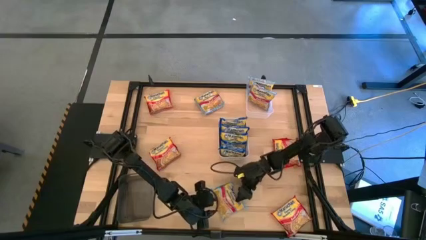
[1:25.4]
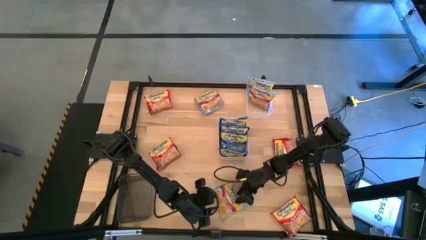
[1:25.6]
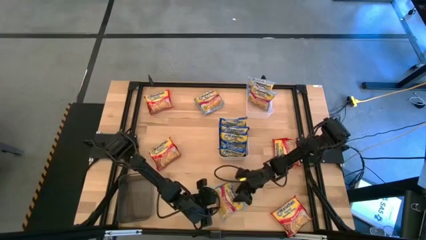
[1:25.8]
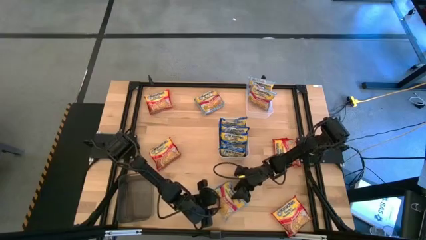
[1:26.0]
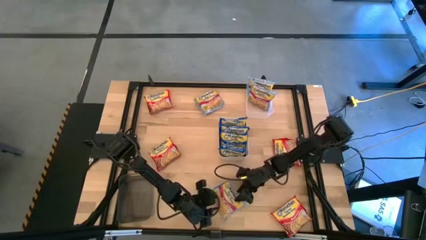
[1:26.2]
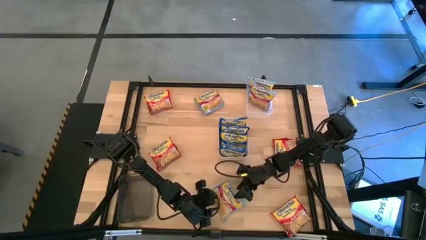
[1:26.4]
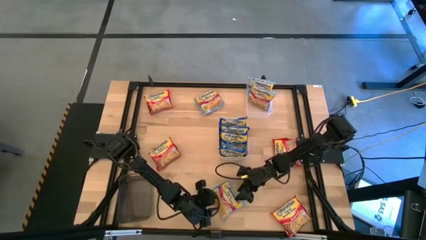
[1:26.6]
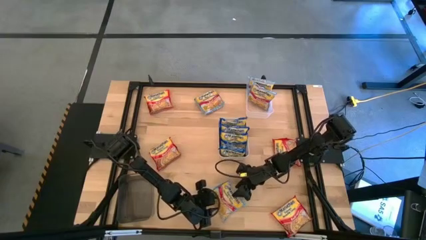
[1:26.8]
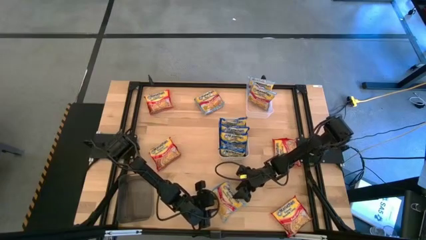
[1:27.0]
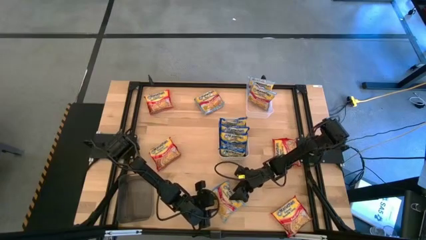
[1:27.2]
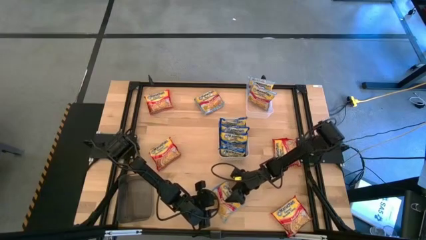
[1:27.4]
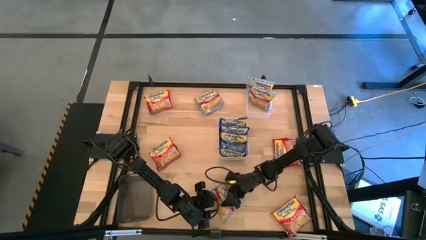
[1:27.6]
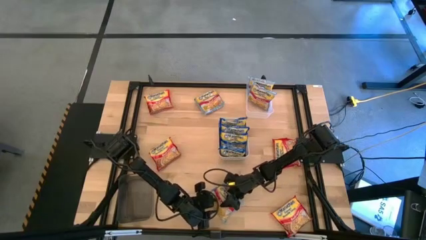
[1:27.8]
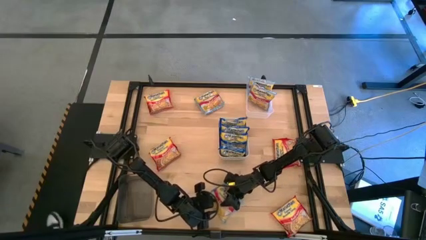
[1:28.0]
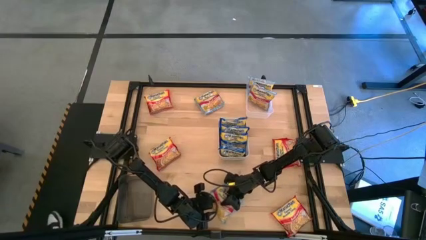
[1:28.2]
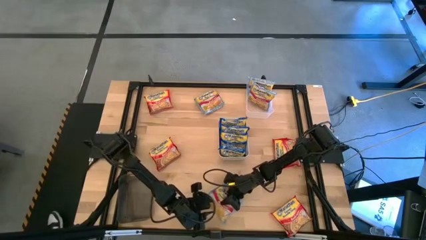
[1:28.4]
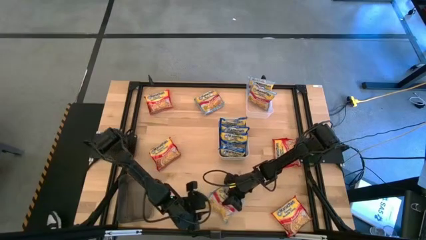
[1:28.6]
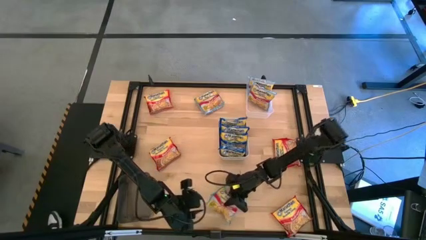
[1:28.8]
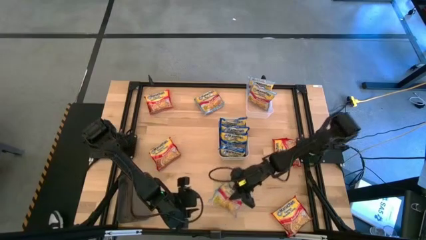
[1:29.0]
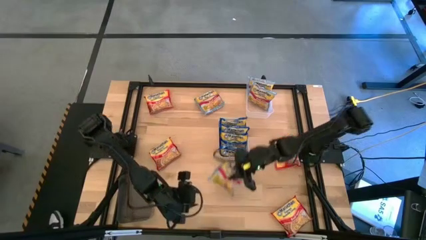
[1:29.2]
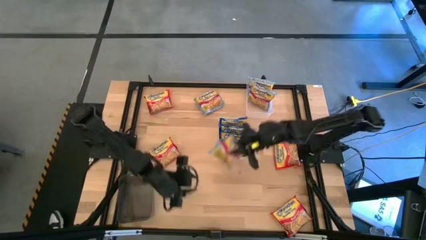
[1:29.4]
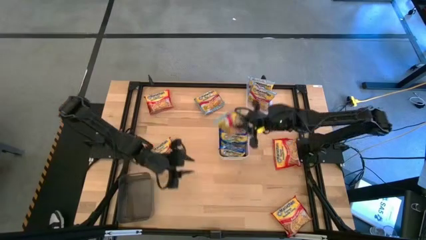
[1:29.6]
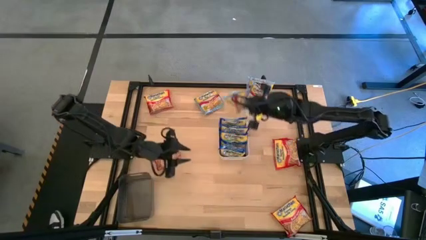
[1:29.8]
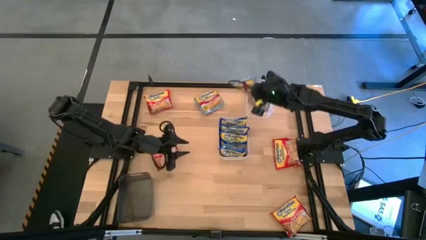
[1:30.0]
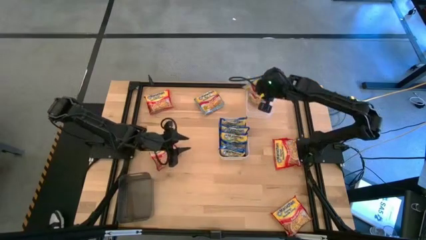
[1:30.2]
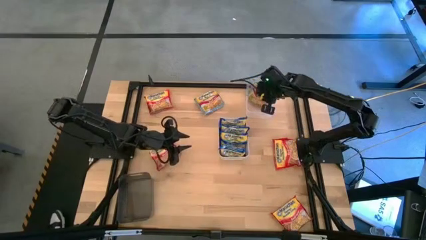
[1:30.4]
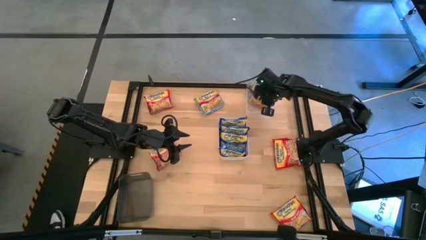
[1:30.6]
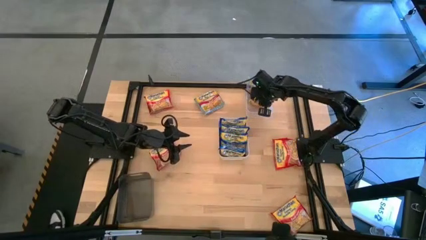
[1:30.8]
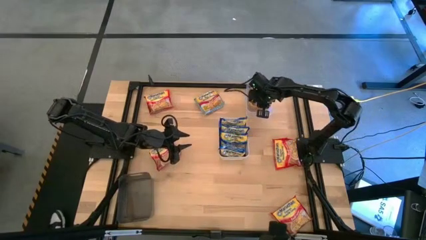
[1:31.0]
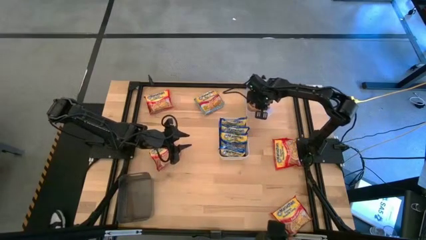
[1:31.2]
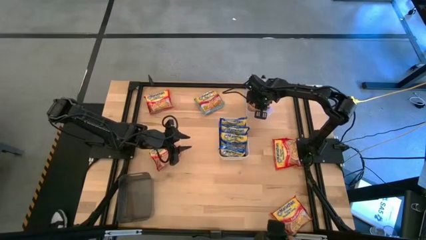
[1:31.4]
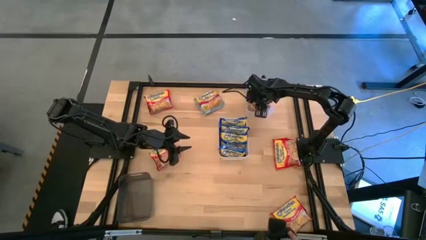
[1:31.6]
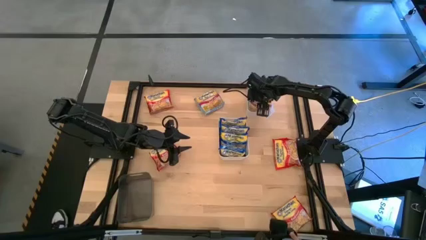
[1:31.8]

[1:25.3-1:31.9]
Task: Sort Maruchan noodles
Put the light blue noodle pack in the transparent bin

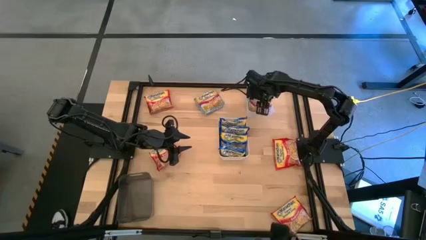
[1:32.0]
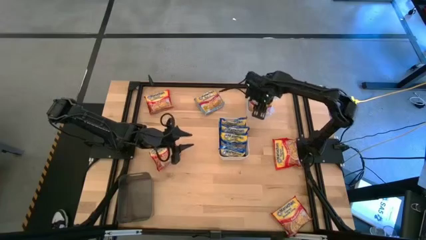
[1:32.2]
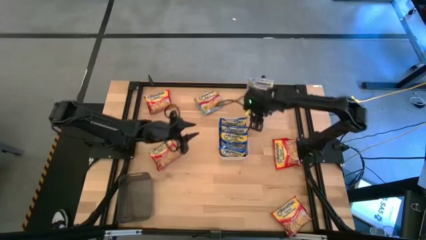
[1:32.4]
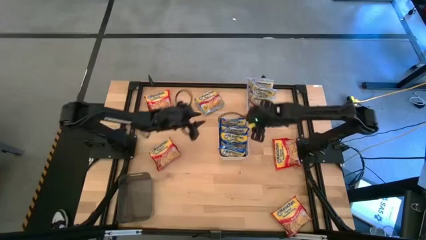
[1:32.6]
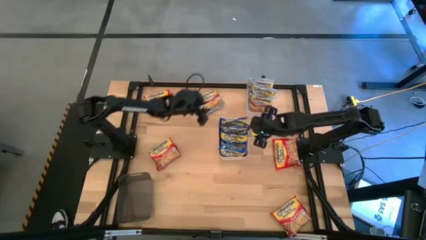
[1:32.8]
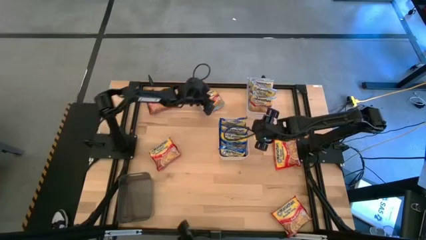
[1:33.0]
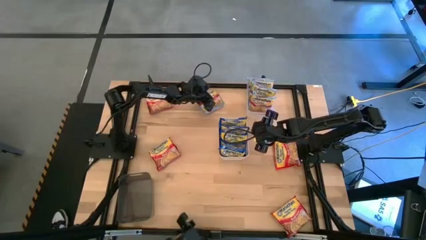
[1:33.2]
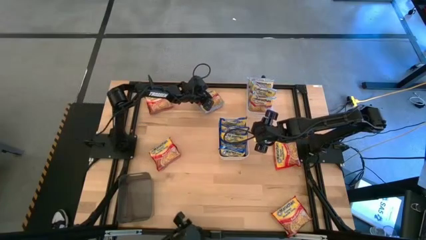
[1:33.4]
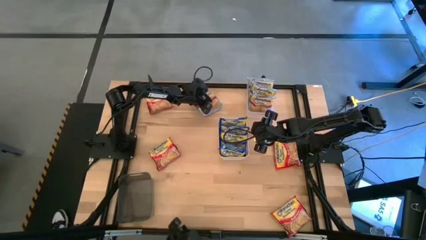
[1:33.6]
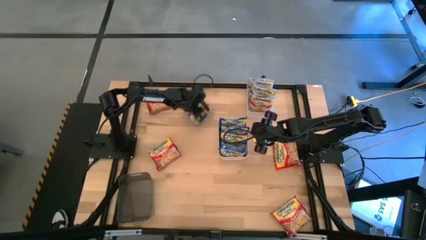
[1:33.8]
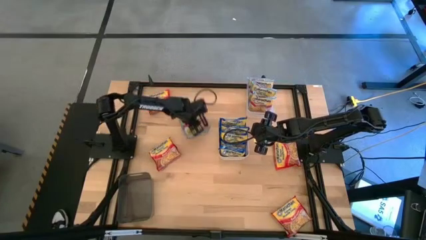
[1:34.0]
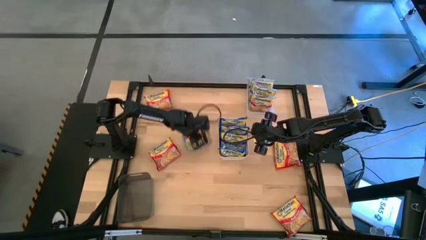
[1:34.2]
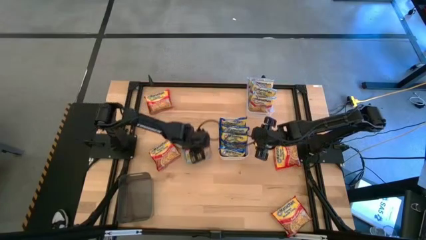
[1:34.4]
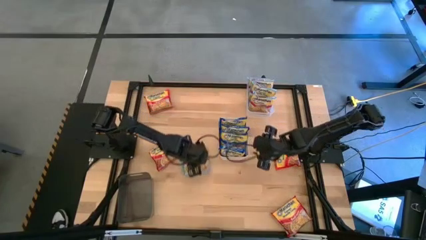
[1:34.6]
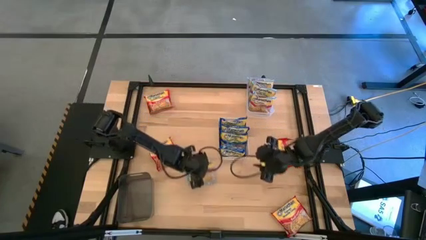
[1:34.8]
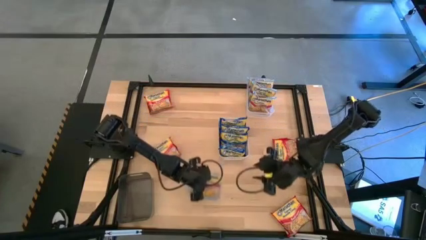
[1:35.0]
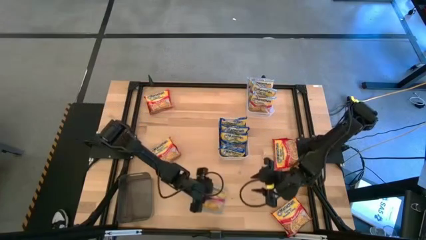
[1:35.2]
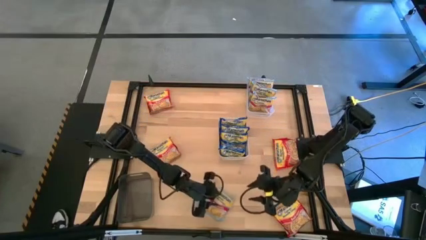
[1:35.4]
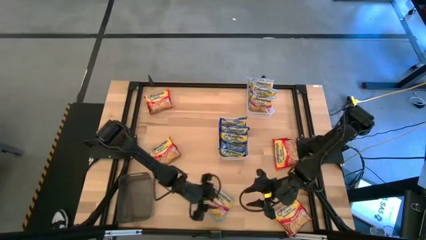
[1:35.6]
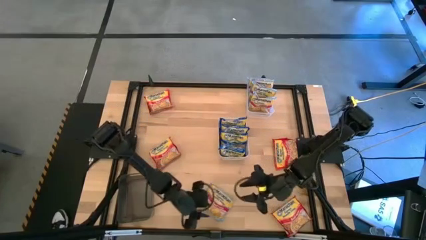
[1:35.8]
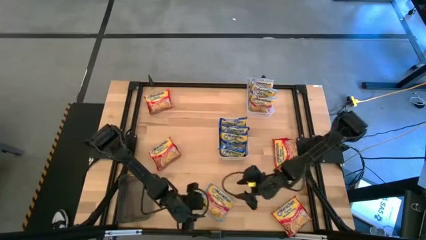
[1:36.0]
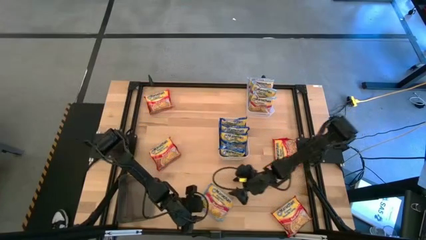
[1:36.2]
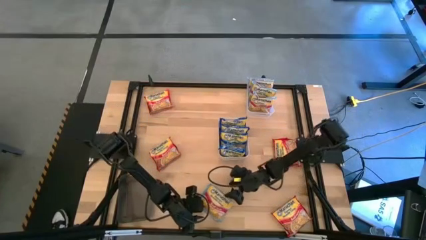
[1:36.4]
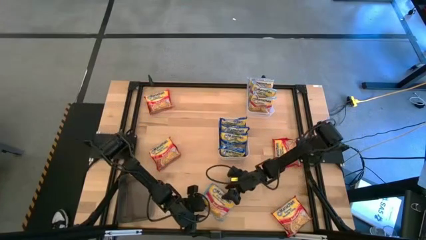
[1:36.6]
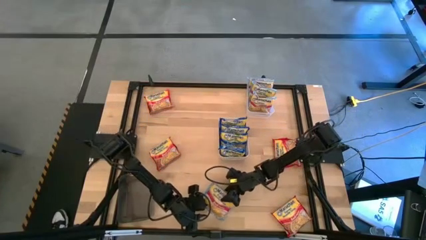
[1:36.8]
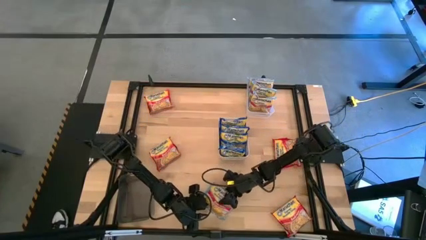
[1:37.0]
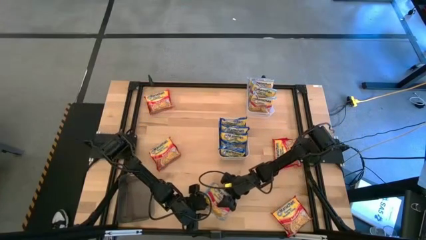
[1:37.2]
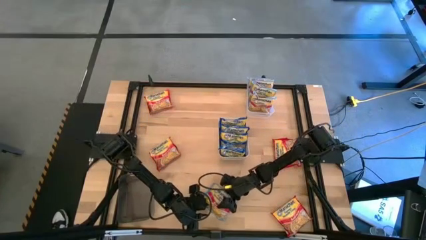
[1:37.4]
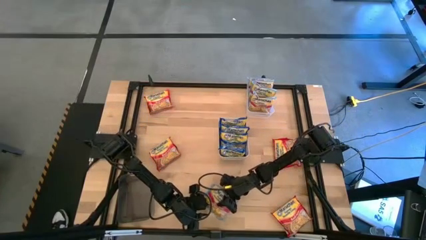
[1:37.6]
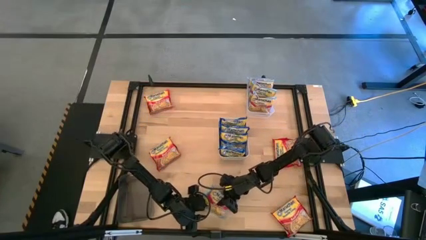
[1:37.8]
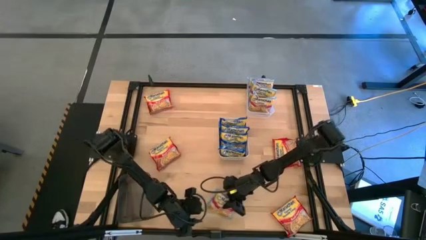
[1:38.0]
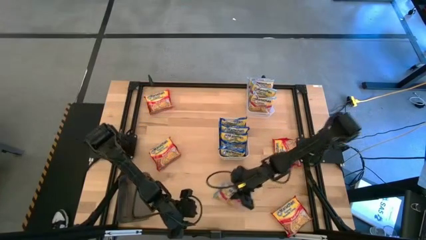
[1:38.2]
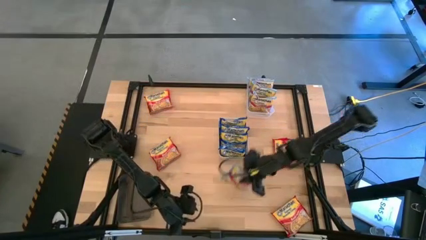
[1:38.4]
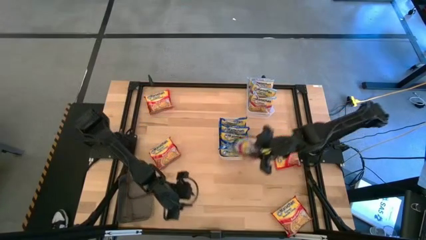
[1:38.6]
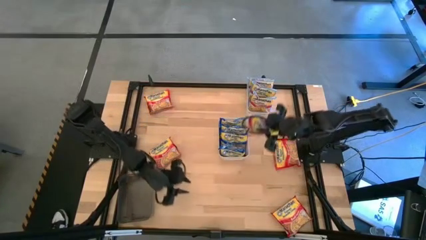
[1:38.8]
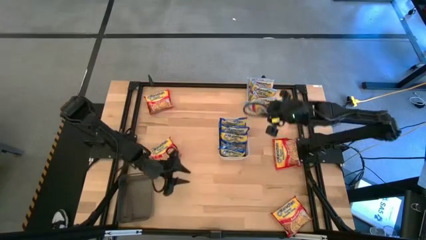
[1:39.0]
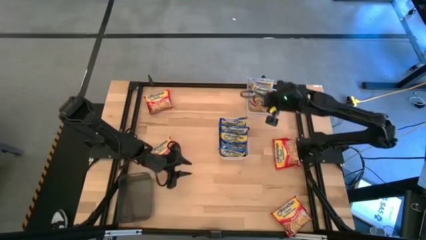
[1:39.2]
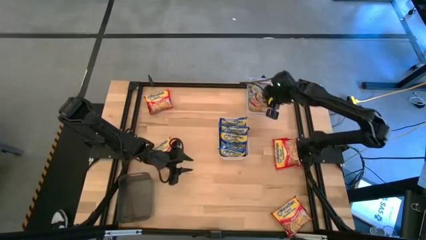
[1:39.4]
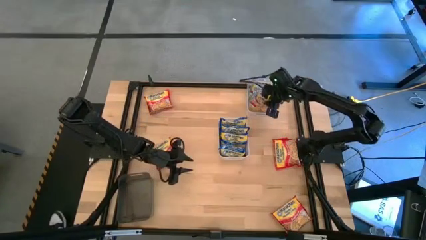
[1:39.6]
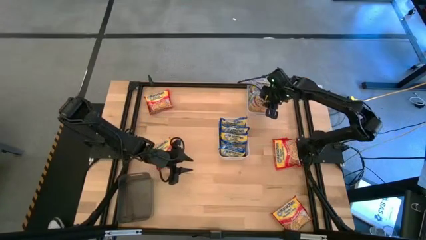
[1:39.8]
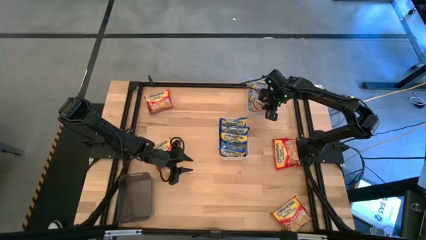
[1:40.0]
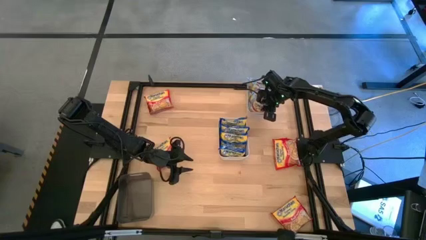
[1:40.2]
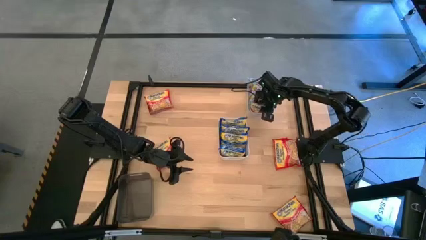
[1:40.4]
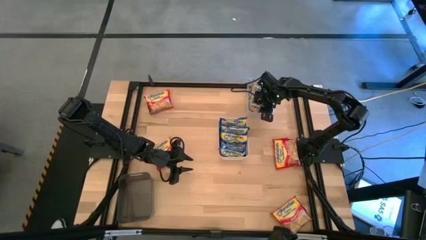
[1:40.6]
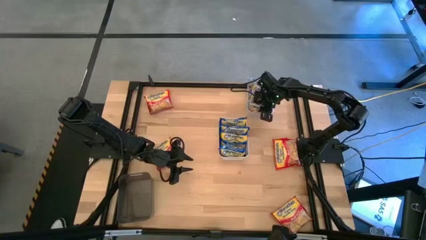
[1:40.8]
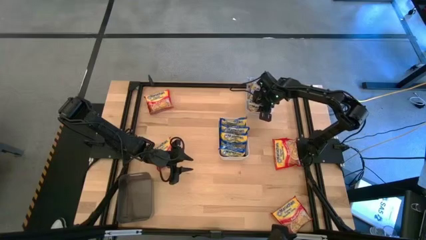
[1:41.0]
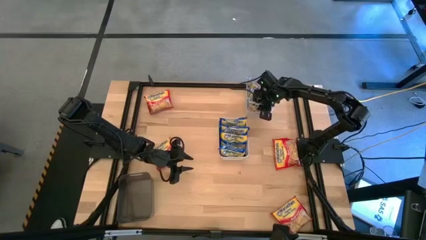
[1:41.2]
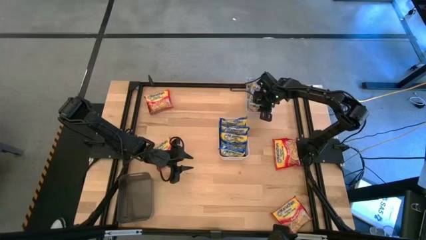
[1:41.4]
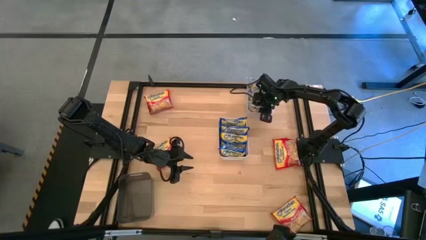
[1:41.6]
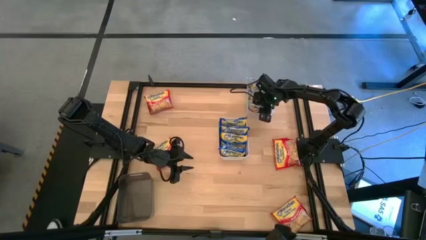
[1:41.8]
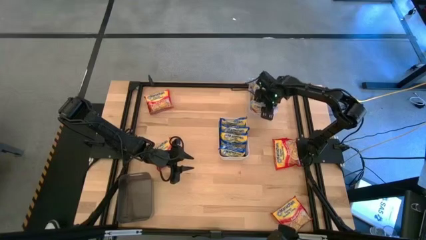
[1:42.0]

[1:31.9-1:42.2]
Put the light blue noodle pack in the transparent bin

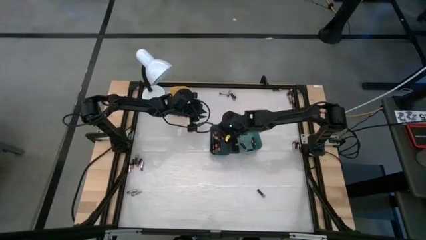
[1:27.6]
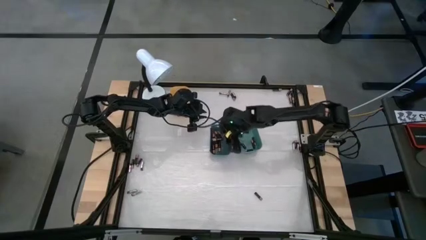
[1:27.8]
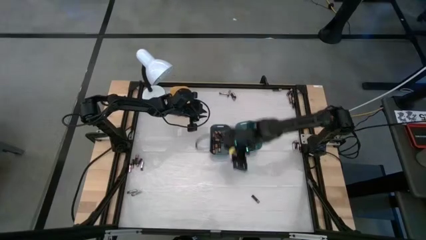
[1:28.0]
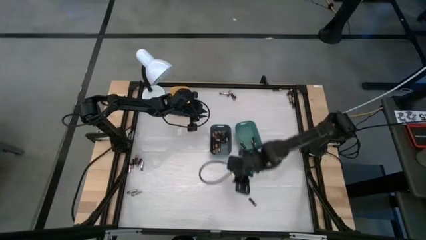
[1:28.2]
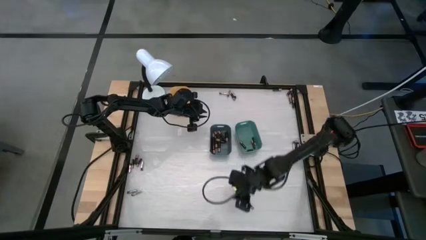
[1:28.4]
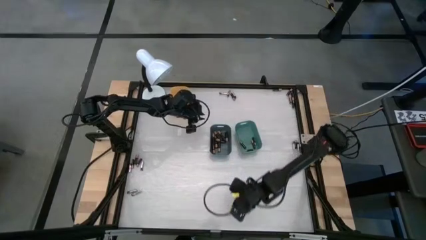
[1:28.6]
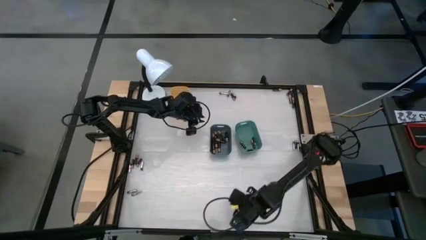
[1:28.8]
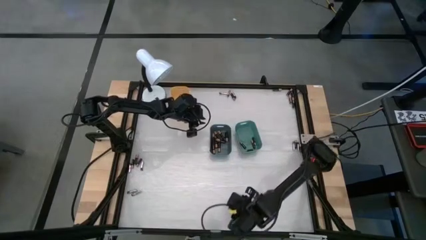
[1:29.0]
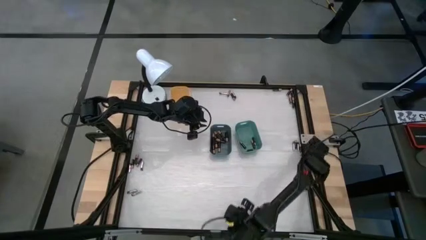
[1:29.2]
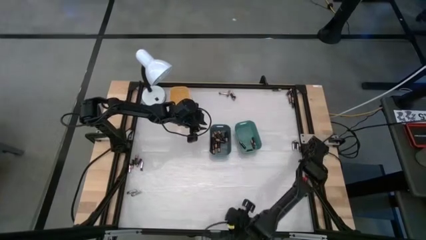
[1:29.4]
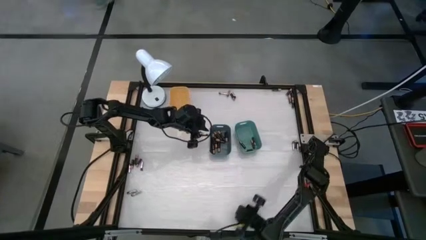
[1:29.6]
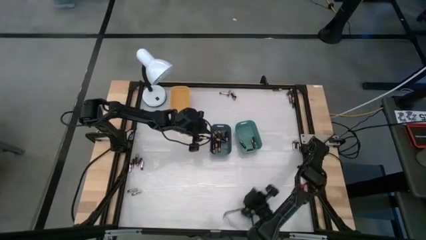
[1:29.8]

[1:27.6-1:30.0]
Task: Sort batteries
Put the black battery into the blue bin
